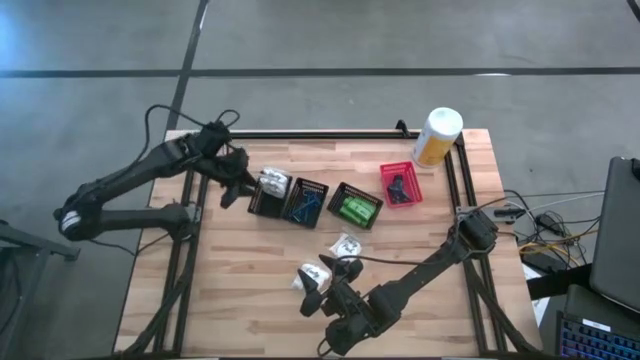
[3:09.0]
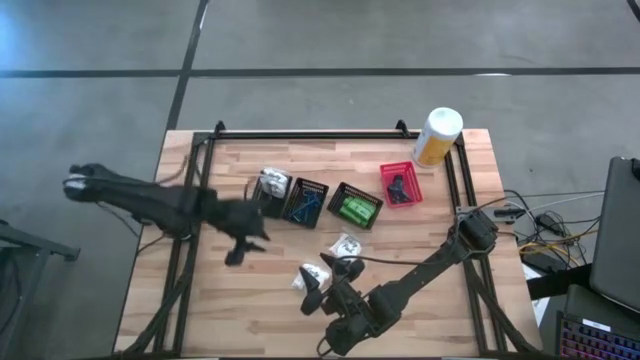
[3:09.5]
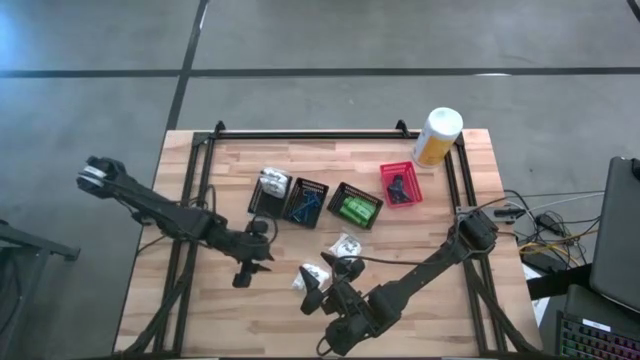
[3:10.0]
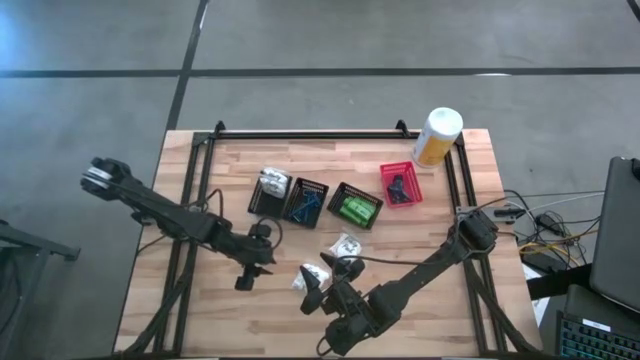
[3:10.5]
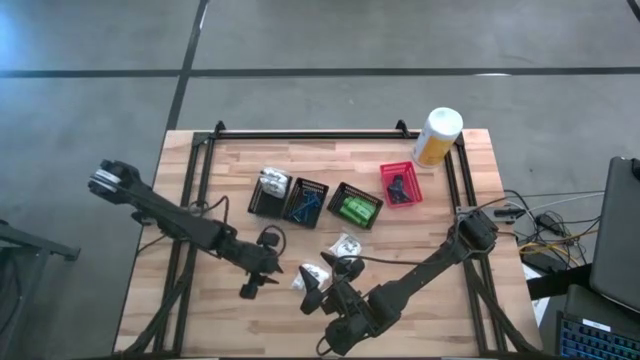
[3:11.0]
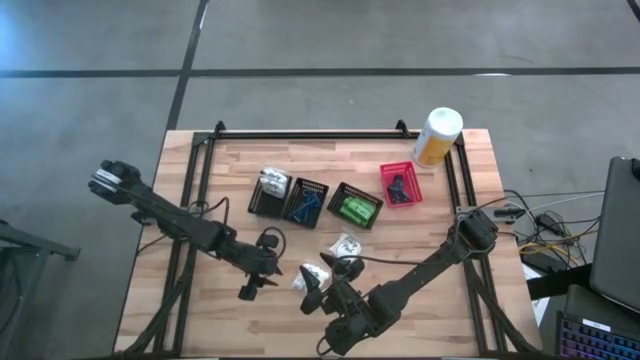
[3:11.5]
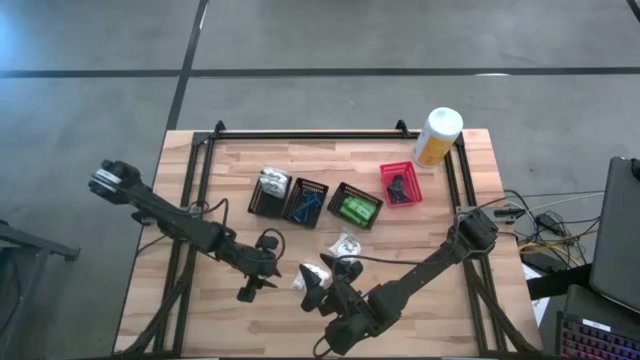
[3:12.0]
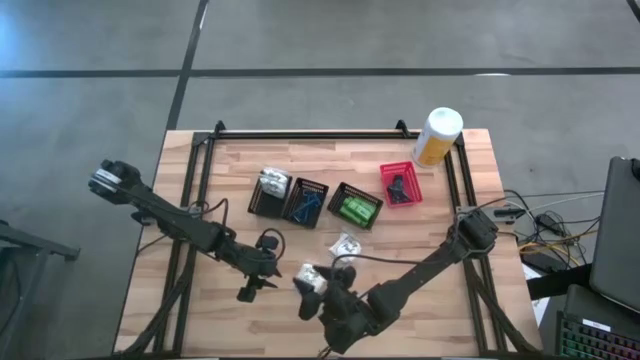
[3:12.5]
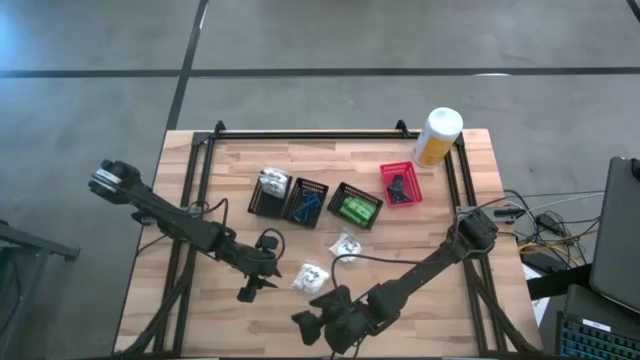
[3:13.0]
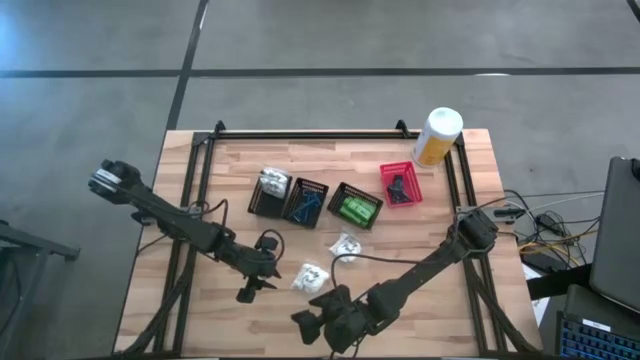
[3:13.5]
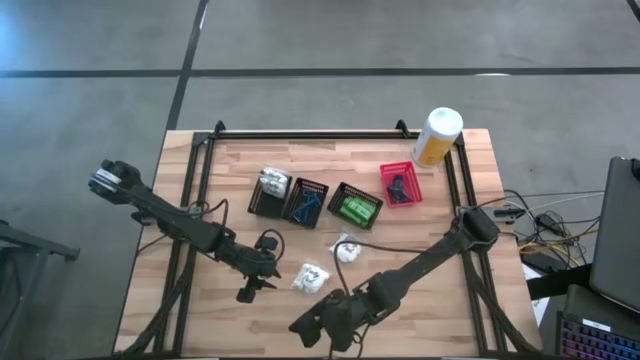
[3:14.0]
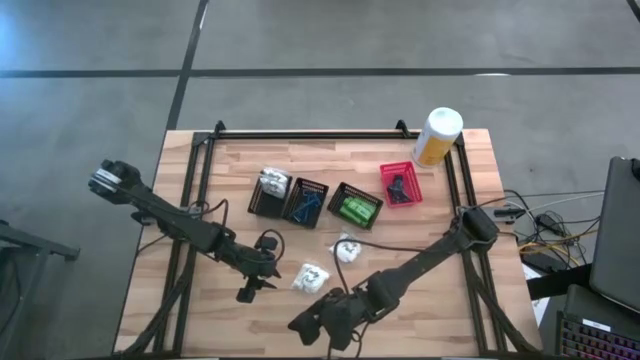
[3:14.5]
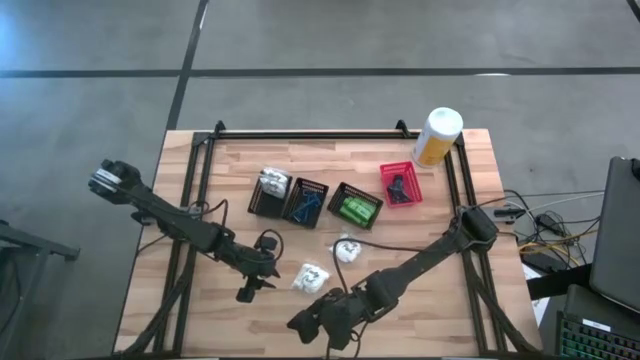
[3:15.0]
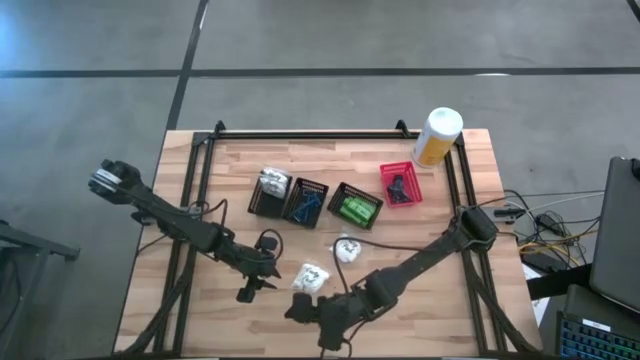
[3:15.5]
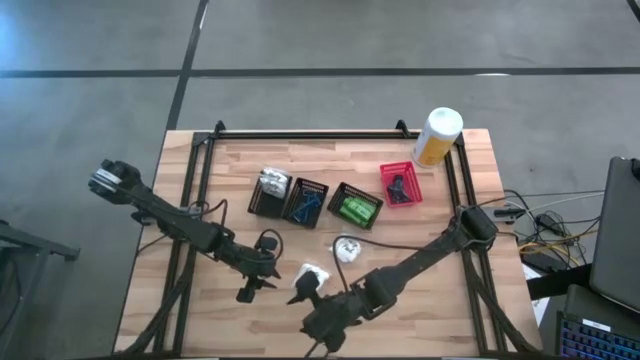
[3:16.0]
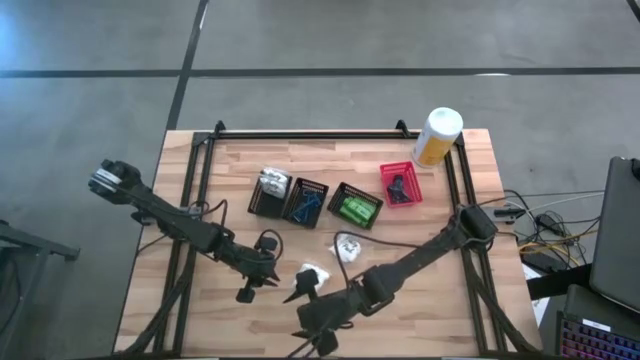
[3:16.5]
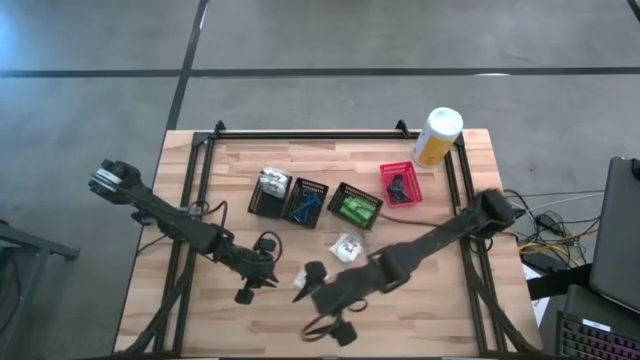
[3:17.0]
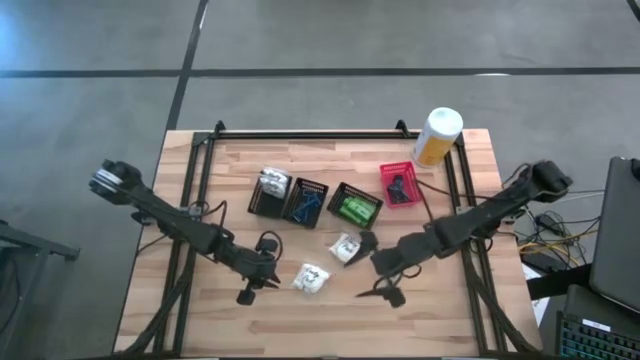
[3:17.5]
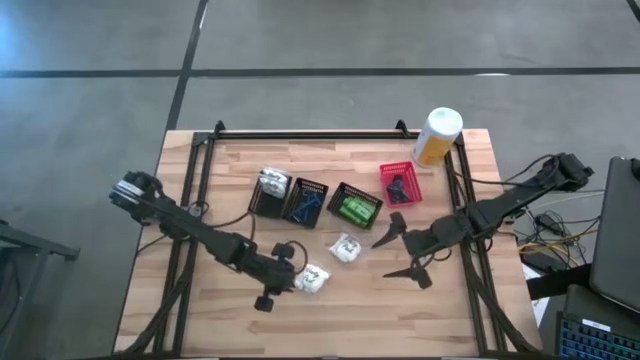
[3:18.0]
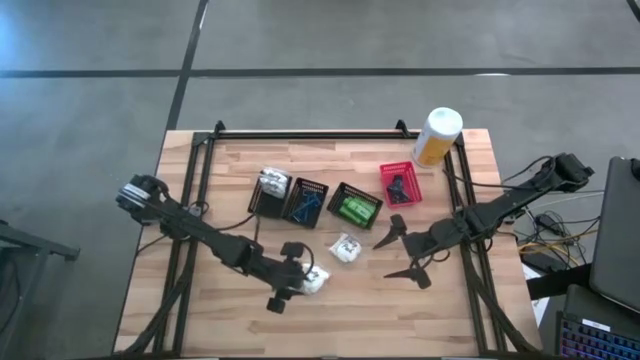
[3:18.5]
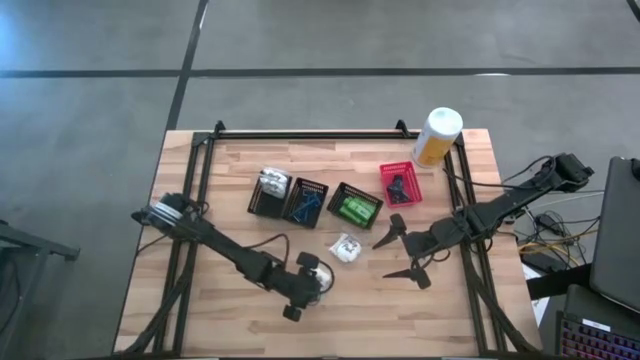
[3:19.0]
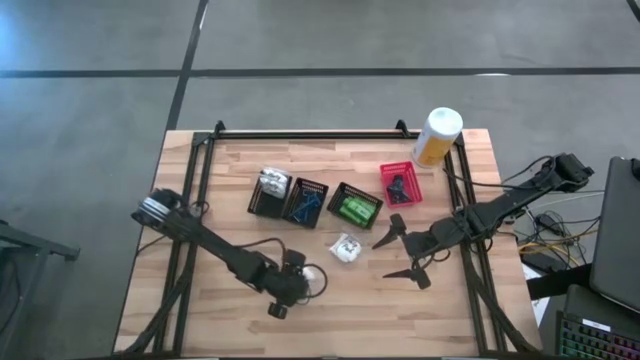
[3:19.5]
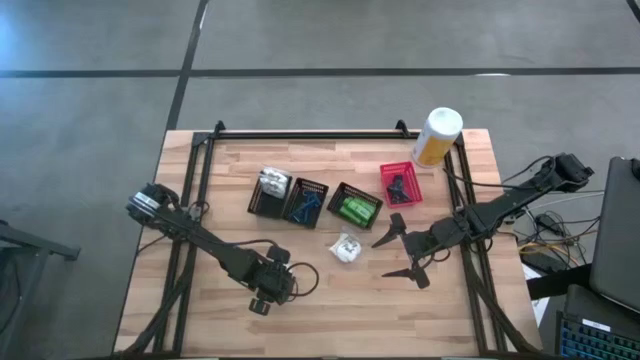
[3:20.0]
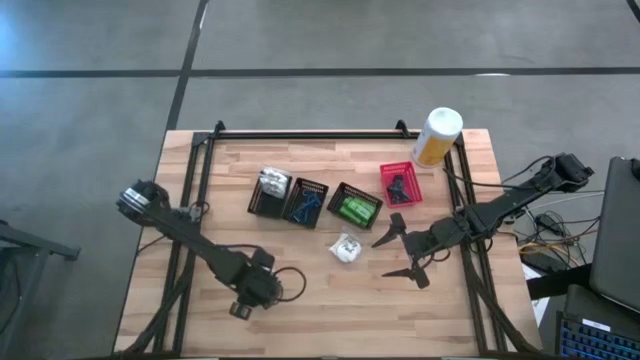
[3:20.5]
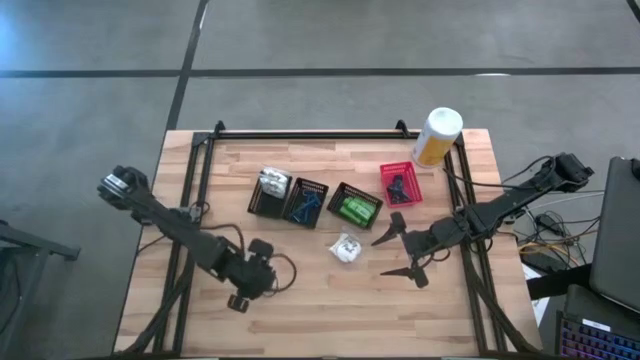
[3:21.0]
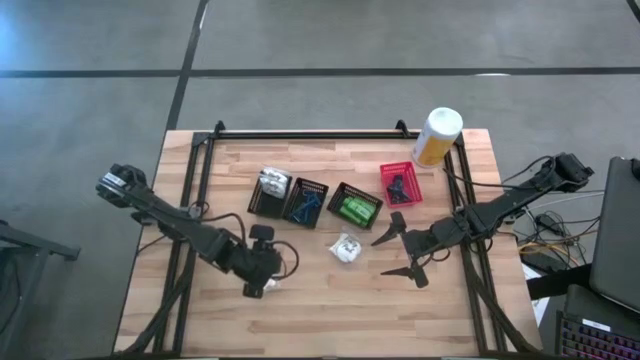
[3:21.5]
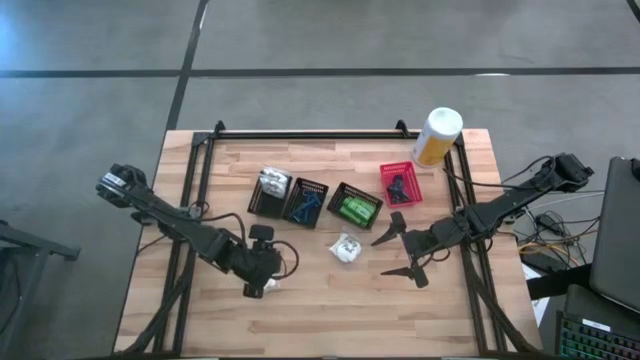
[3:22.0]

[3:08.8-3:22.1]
Task: Pick & Place Travel size toiletries
Move the bottom vanity pack to the middle left of the table

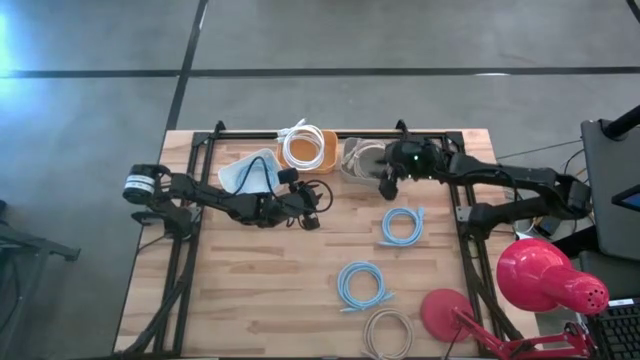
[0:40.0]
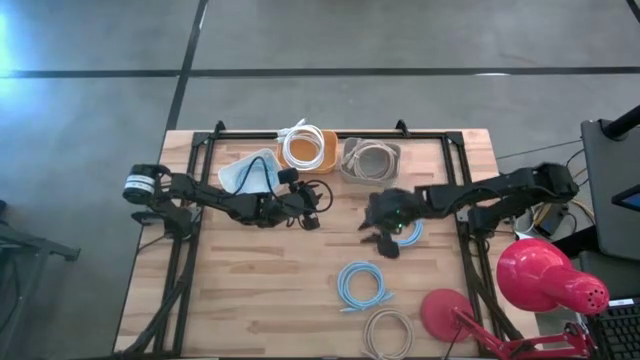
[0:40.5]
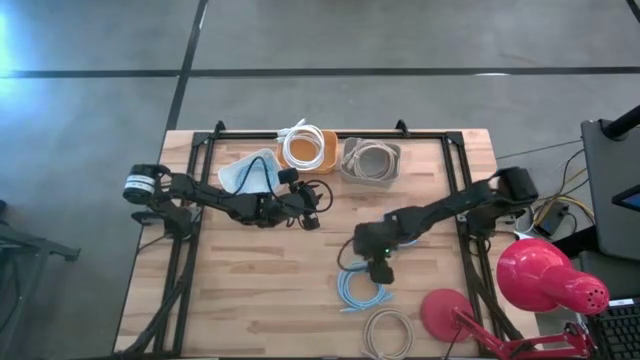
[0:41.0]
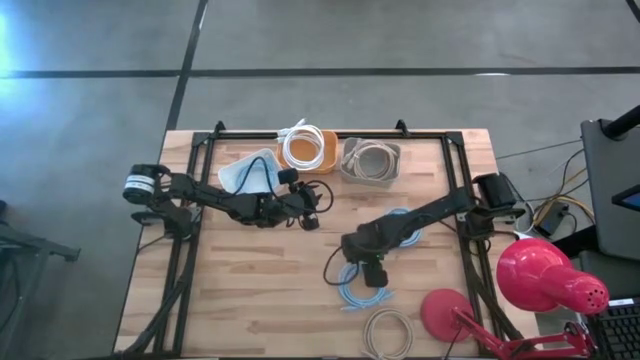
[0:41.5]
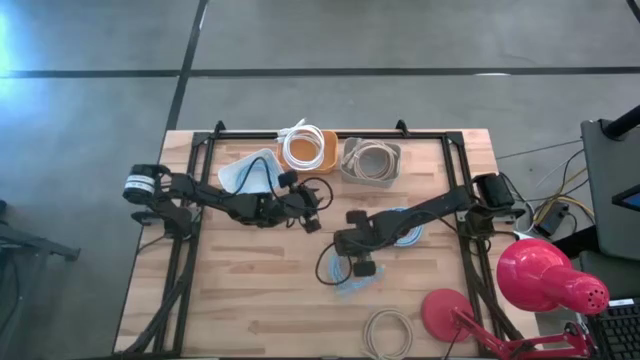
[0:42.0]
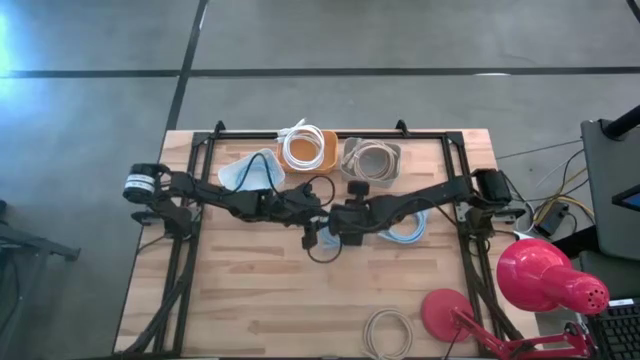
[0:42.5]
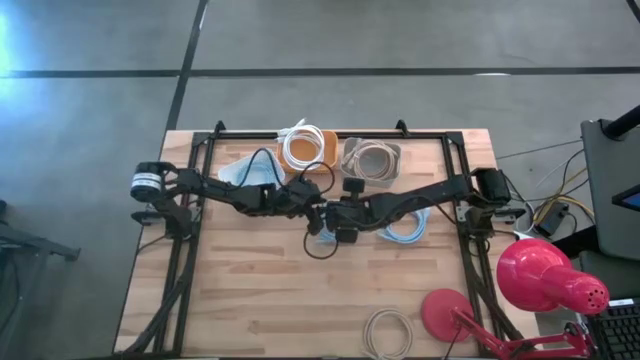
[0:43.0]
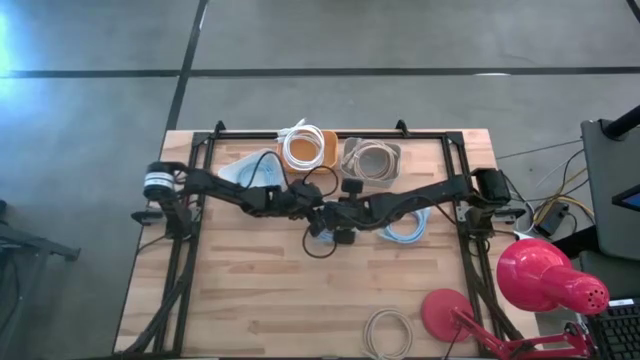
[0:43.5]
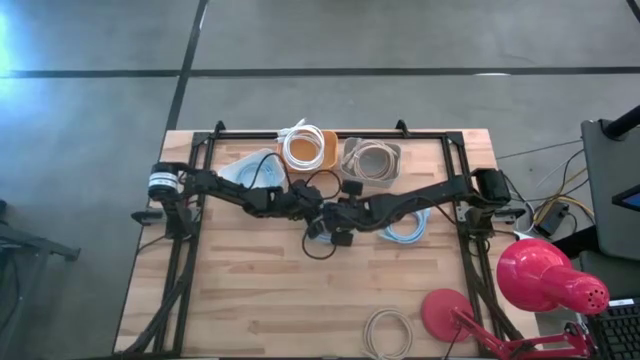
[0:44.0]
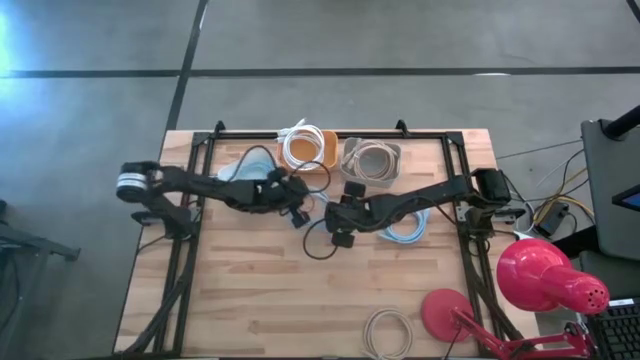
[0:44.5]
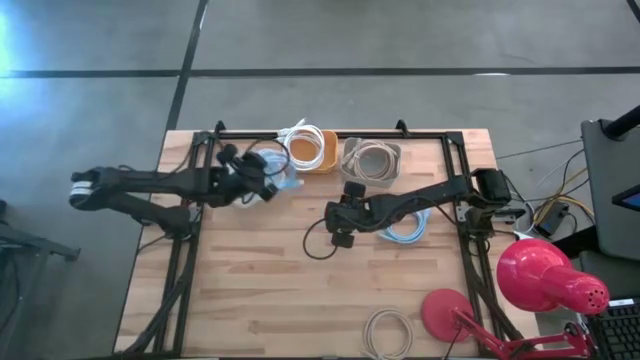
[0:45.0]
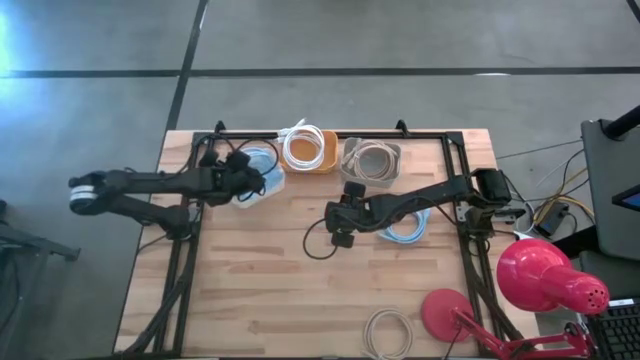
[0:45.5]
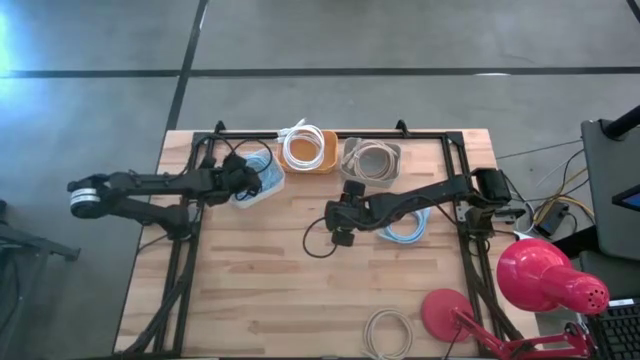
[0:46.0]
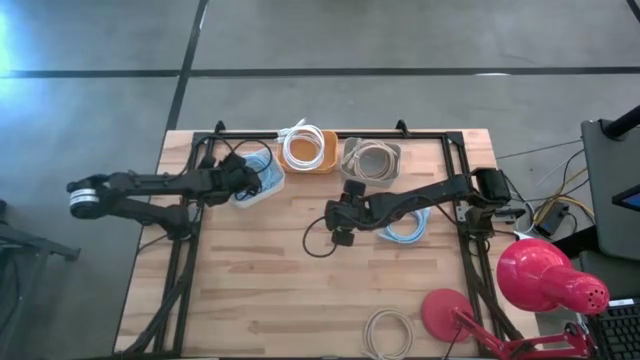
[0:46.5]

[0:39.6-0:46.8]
Task: Sort HDMI cables
Put the bottom light blue HDMI cable into the white bin
